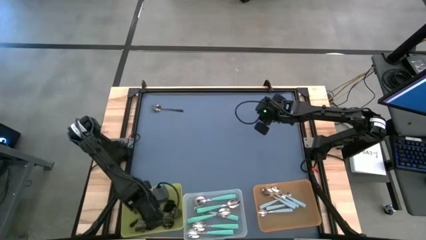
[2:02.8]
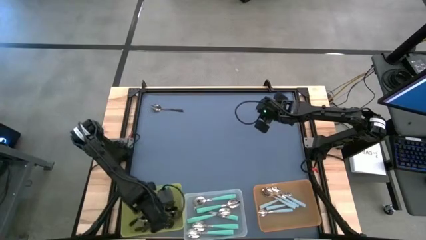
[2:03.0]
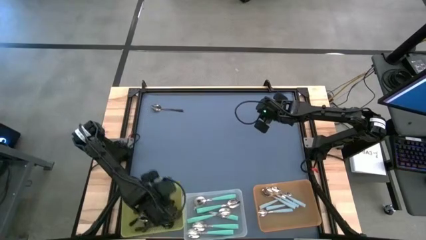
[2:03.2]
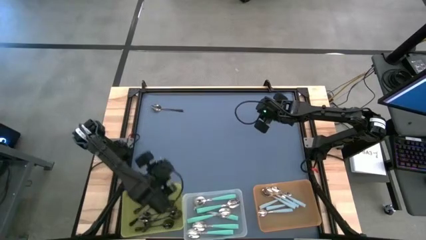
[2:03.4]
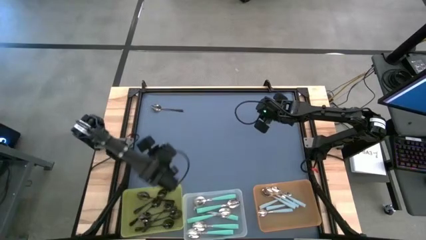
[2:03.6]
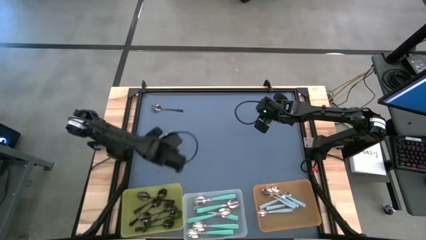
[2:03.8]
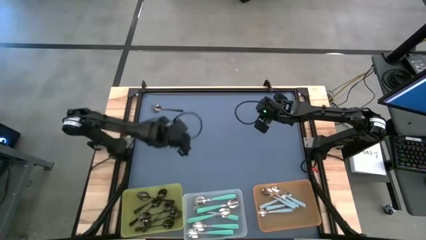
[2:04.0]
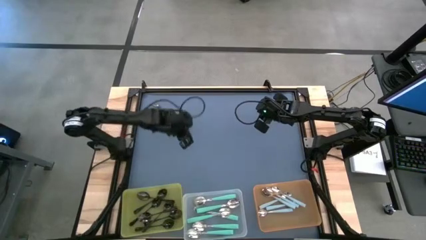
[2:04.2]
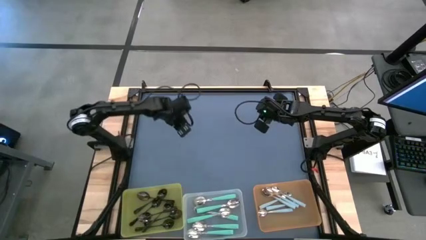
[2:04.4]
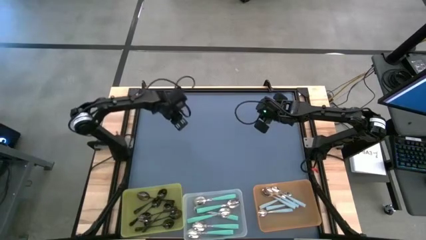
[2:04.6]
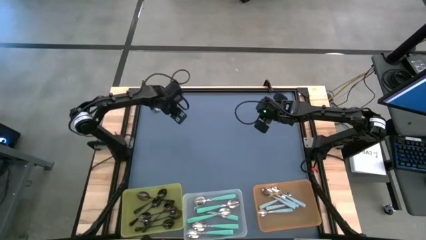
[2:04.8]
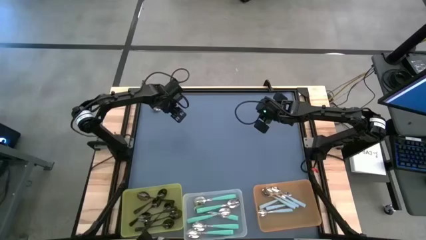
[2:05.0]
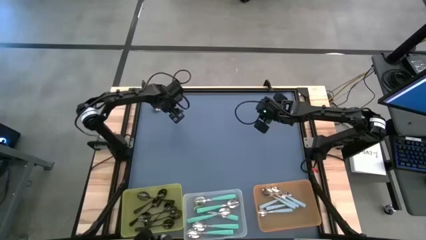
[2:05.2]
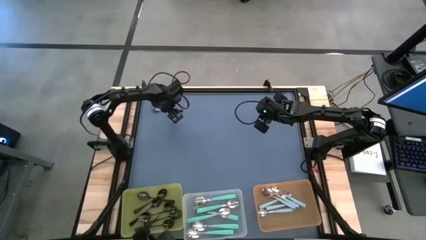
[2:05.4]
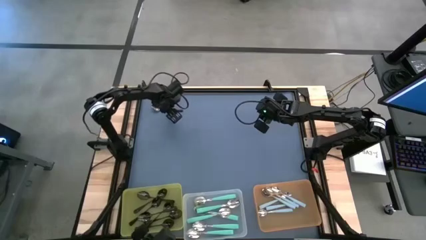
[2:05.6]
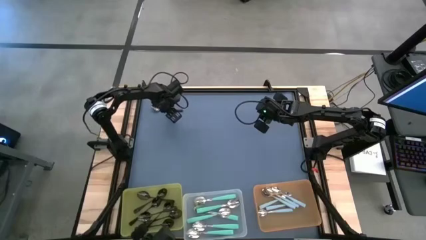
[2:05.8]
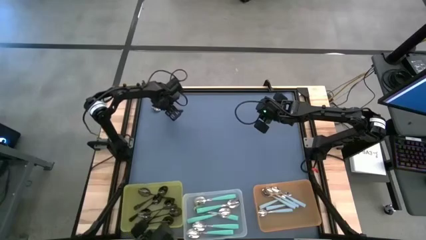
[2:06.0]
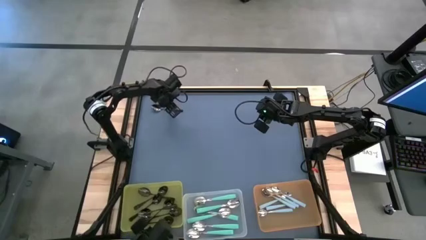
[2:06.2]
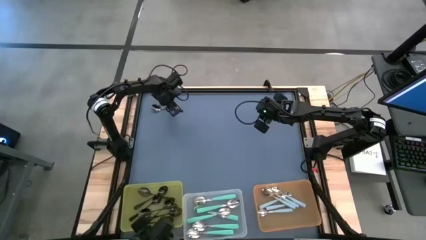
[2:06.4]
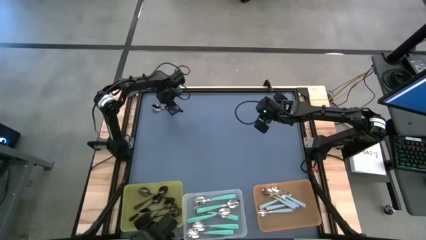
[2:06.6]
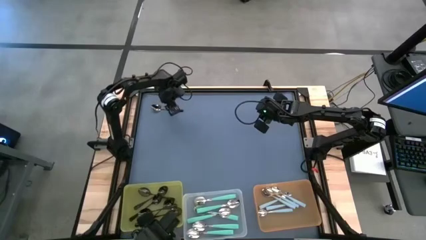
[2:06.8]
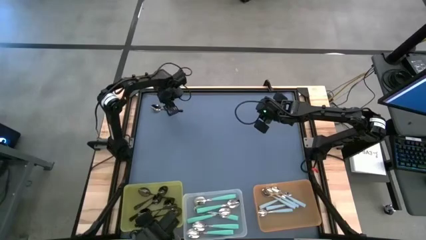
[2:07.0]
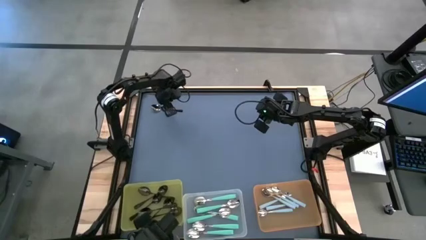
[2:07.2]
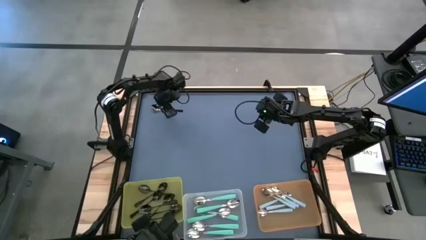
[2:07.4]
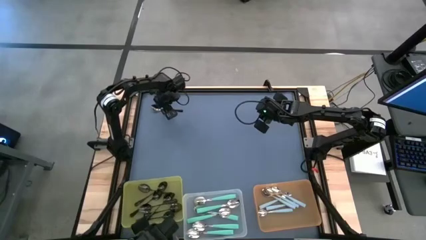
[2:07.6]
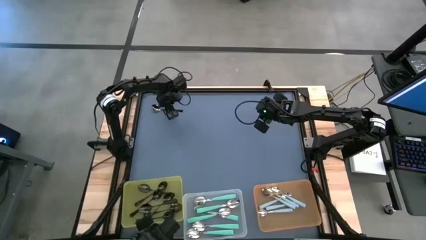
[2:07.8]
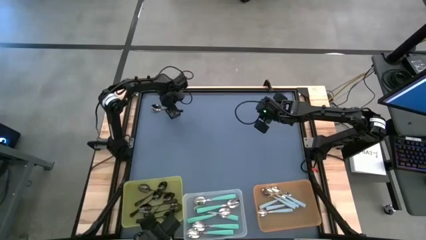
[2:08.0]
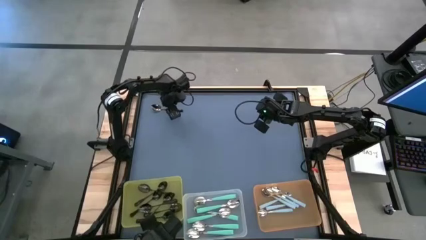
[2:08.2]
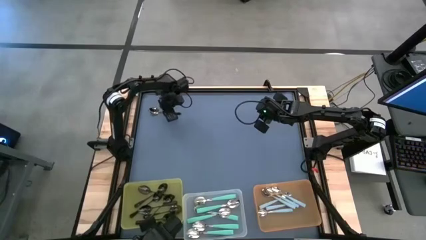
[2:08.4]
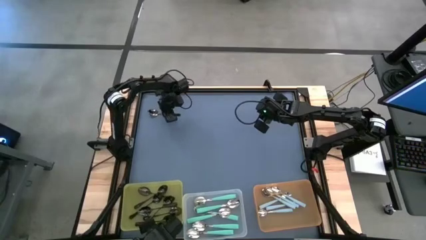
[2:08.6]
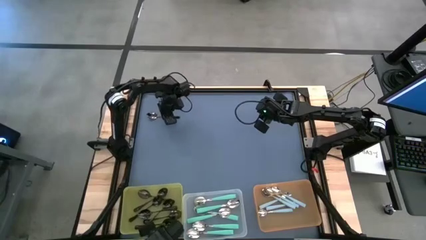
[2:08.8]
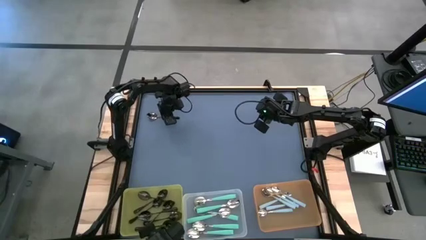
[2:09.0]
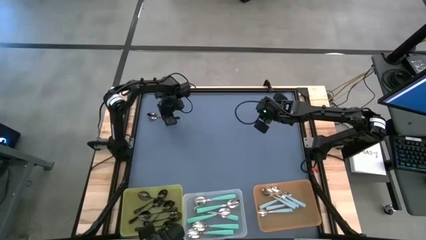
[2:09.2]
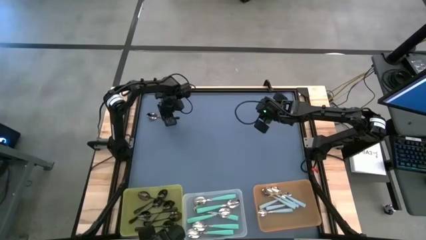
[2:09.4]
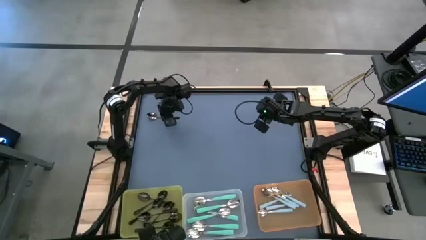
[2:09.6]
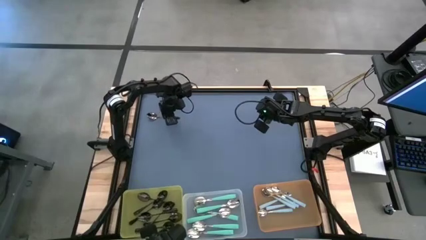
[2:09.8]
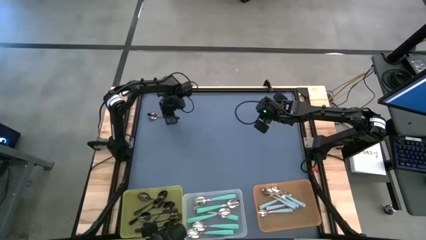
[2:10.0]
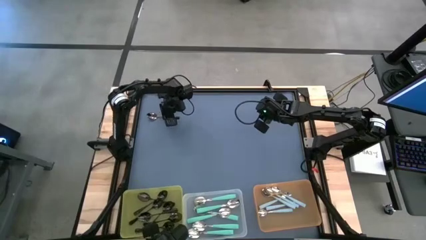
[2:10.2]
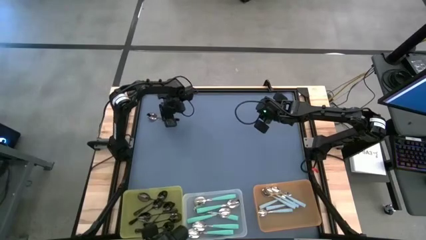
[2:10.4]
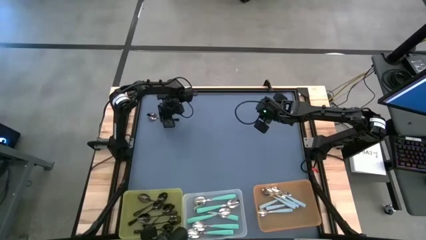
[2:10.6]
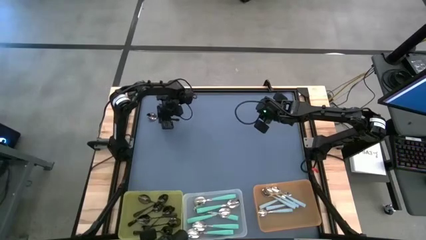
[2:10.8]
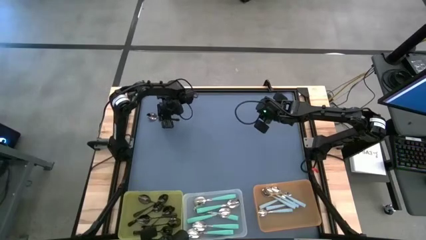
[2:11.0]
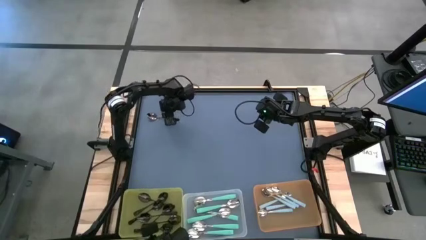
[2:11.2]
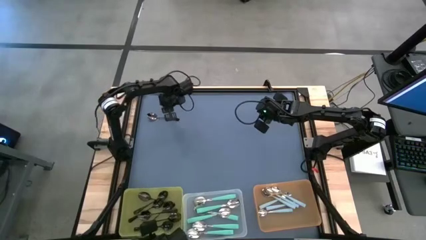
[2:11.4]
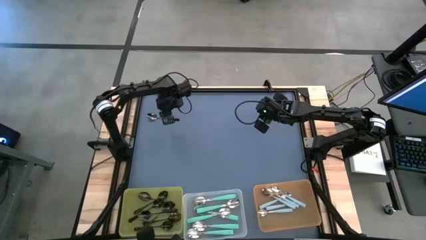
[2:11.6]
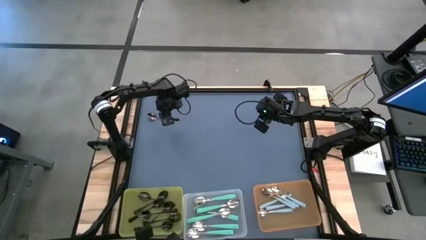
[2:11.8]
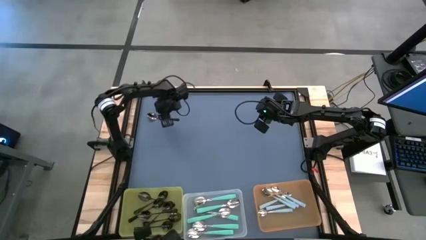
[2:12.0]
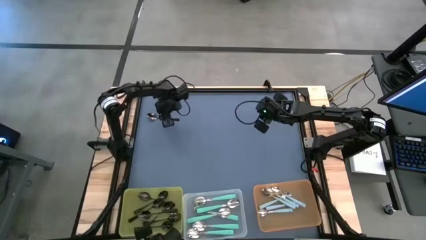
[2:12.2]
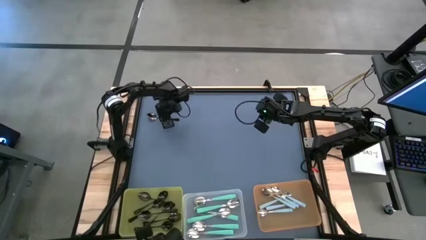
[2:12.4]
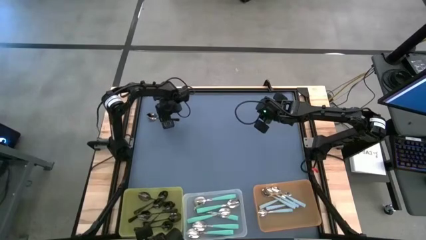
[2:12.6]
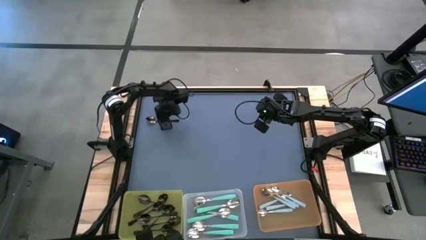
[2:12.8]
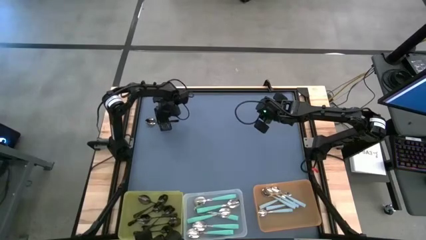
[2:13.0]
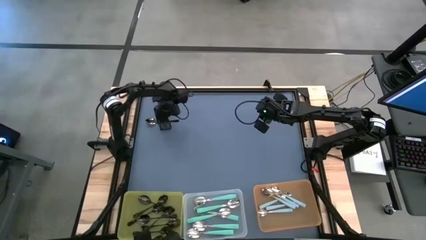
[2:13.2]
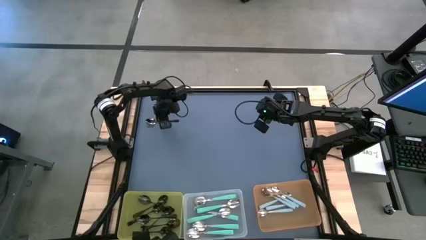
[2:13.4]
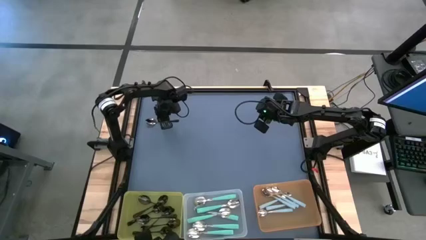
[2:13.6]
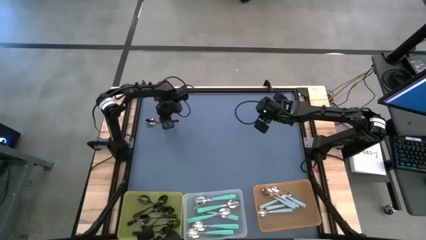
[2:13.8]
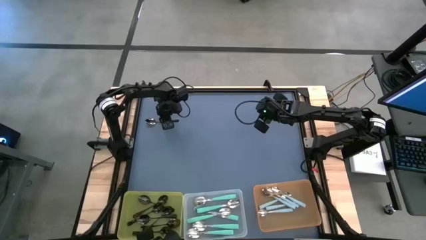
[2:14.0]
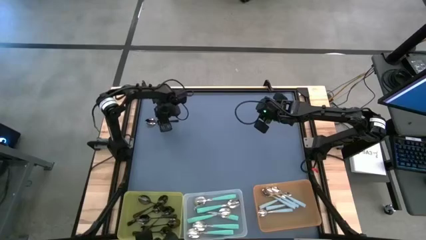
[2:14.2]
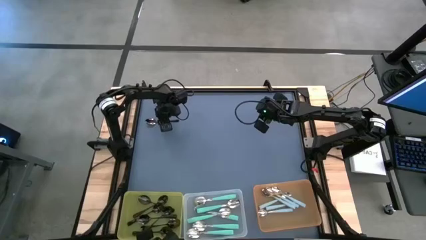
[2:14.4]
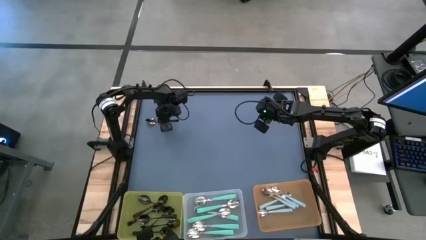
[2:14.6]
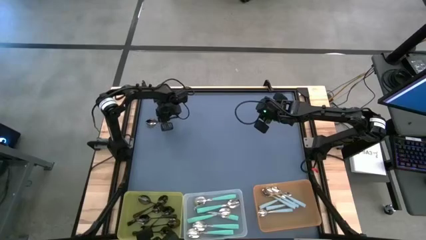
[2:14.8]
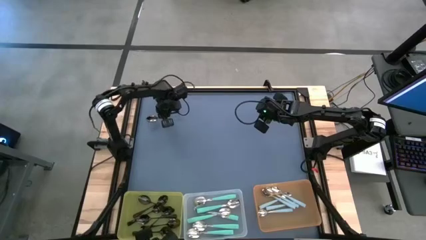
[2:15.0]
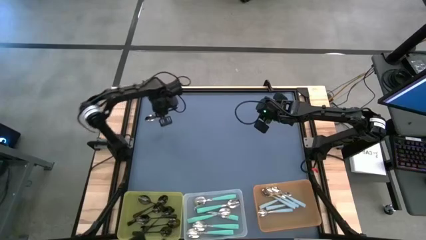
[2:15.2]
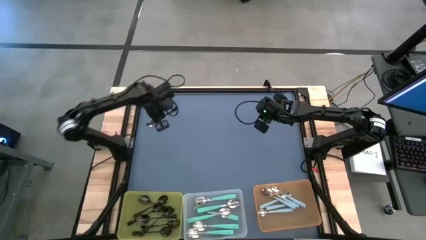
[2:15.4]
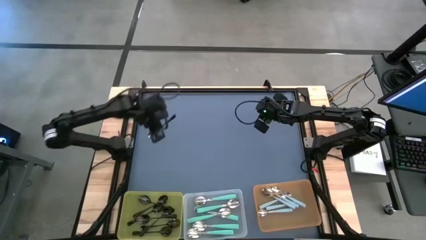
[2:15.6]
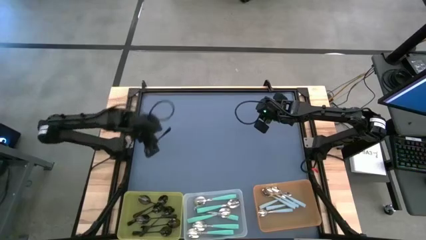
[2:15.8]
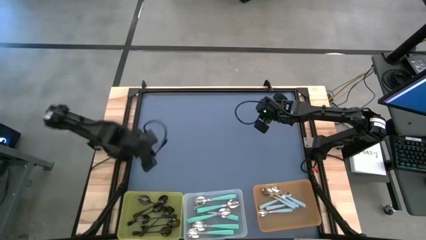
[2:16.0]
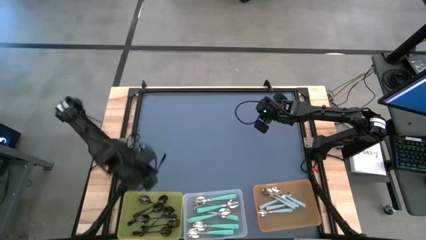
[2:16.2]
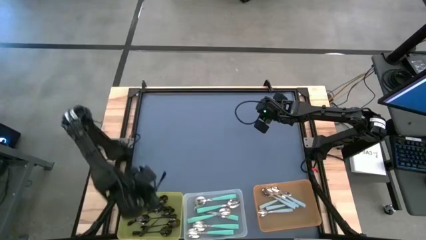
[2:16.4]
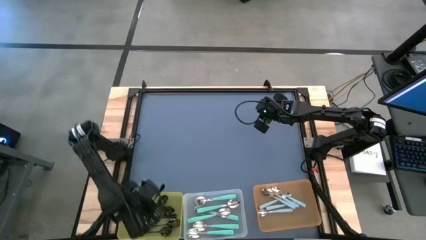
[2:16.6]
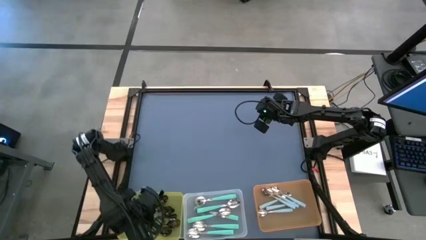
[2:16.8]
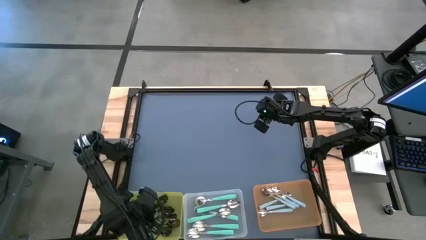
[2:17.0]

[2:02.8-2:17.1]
Task: Sort silverware by color (type)
Put the black spoon into the yellow bin

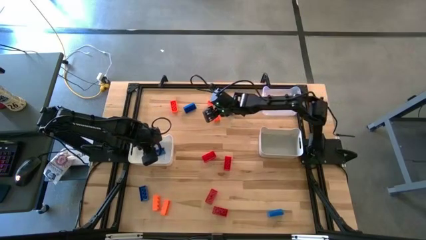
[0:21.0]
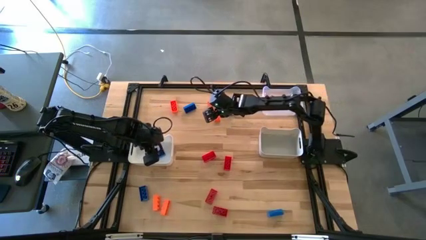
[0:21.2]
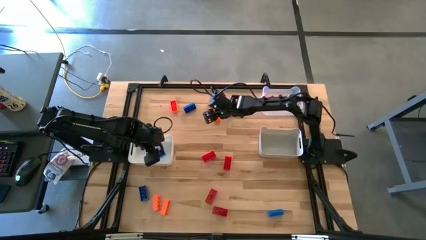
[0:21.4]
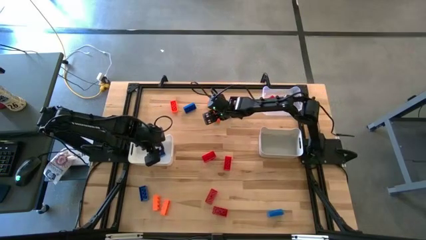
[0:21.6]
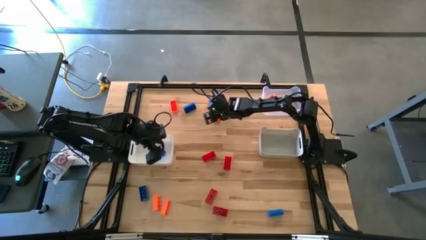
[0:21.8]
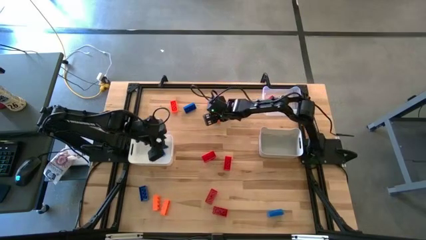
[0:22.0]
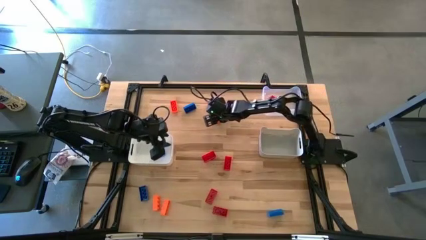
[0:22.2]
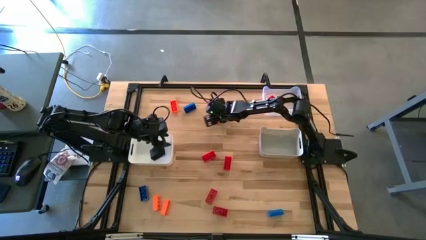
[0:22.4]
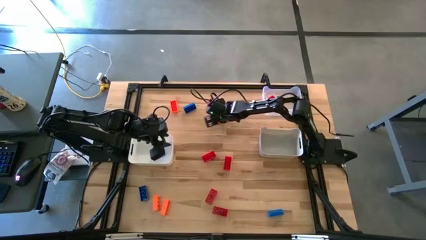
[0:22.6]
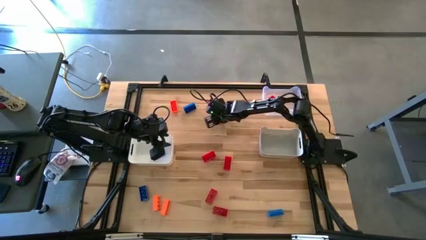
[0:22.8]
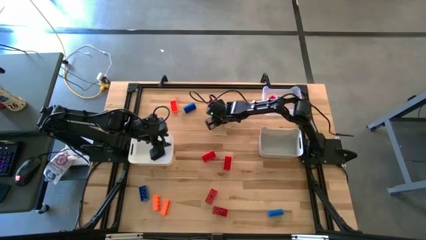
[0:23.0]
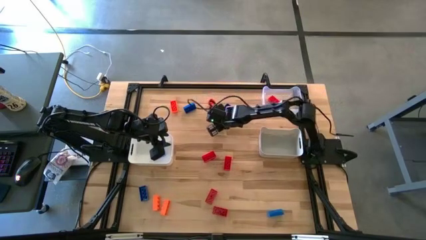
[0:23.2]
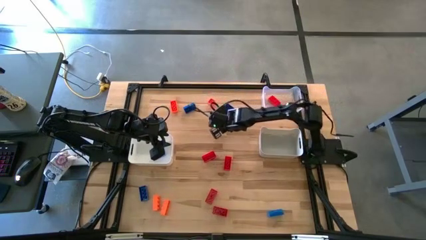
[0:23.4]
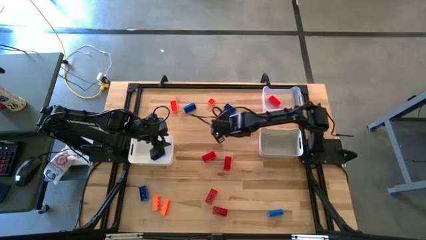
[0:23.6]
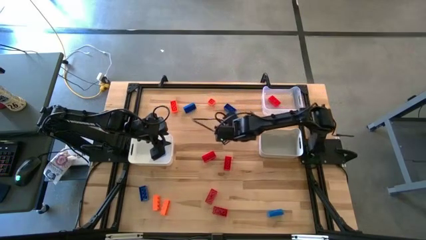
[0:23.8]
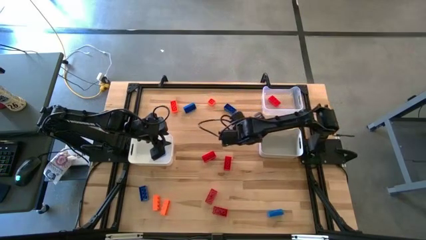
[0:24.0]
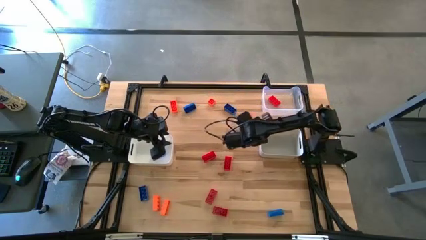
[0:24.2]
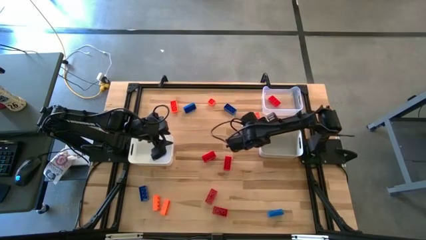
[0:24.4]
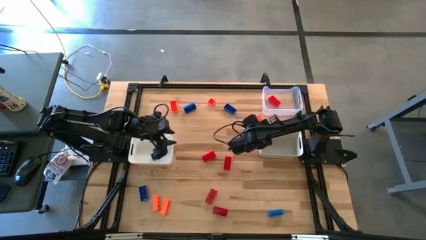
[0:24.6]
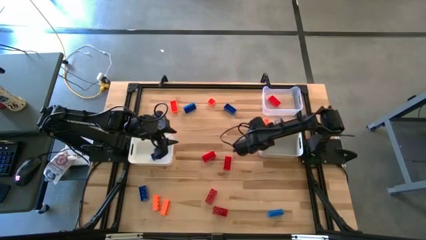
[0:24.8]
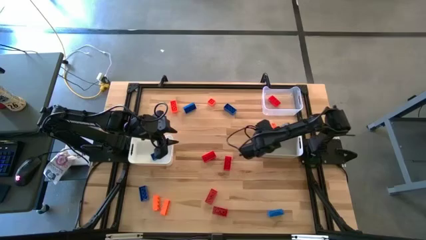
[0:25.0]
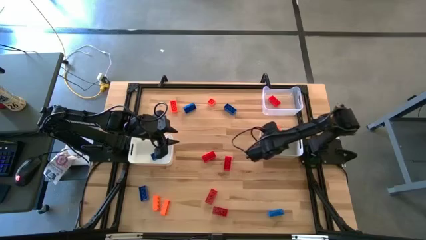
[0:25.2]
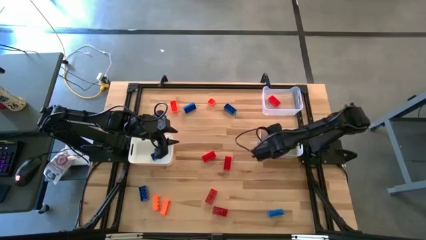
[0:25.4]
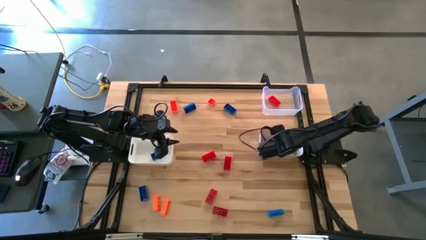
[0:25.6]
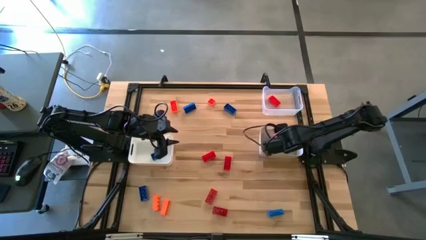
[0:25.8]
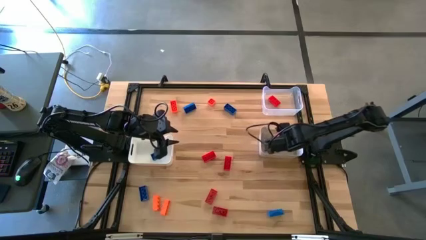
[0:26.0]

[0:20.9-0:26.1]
Task: Sort & place blocks by color
Put the orange game piece into the gray bin
